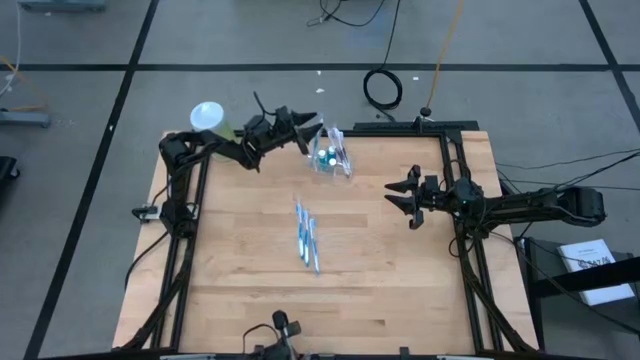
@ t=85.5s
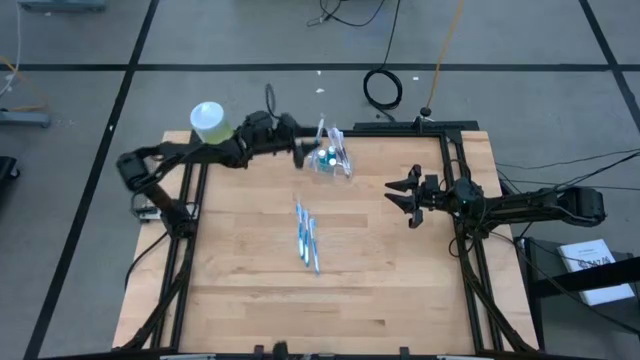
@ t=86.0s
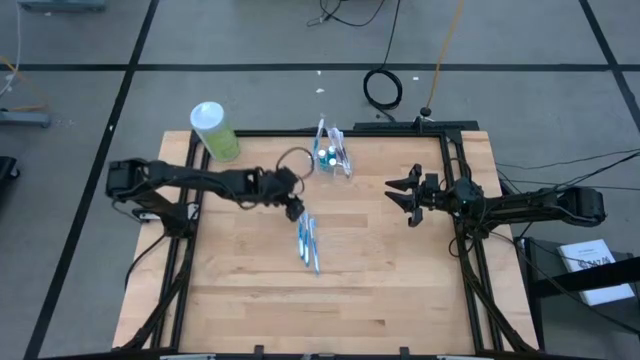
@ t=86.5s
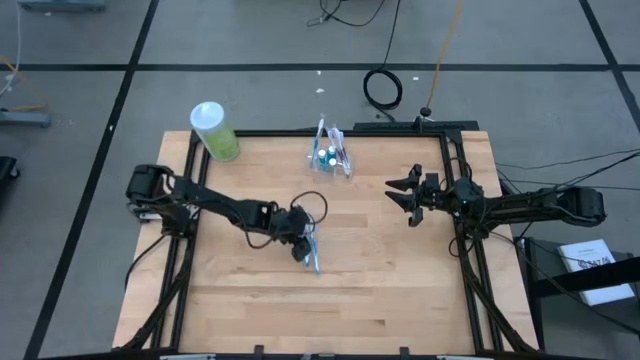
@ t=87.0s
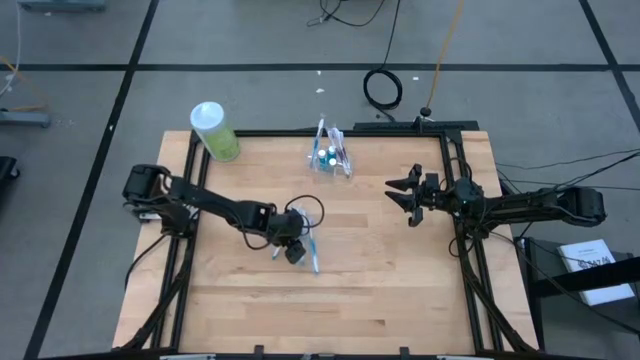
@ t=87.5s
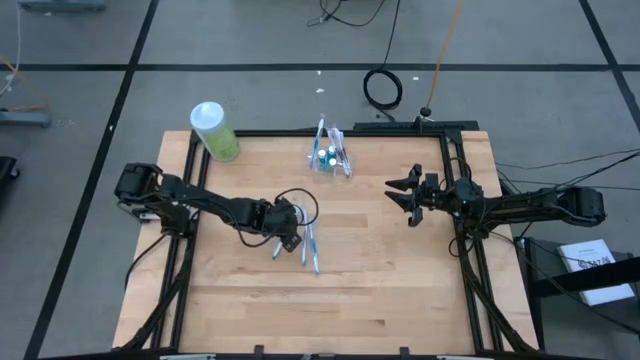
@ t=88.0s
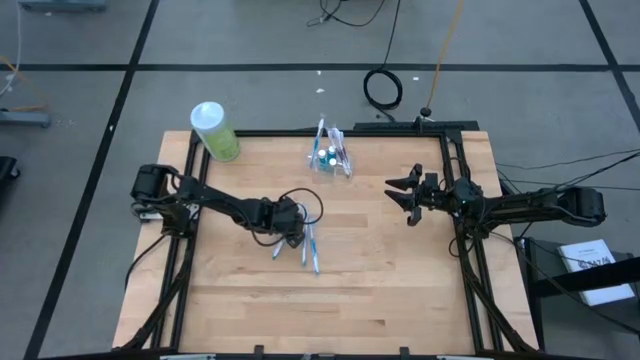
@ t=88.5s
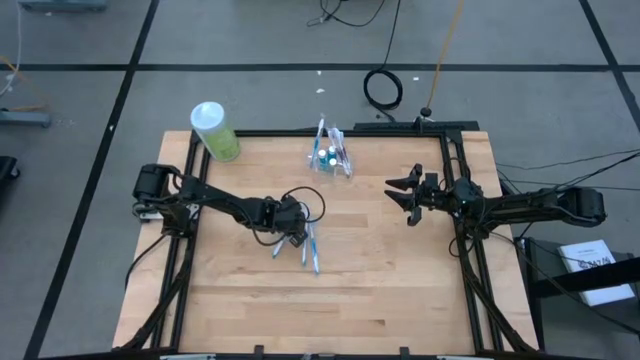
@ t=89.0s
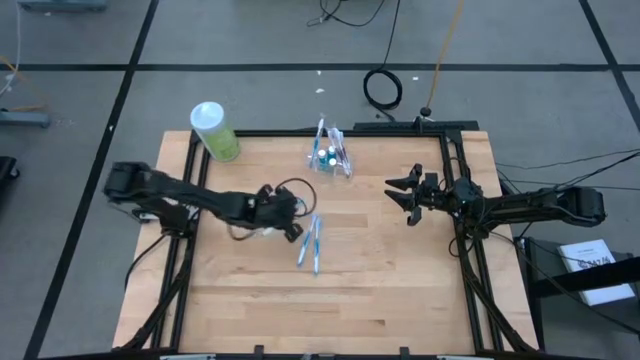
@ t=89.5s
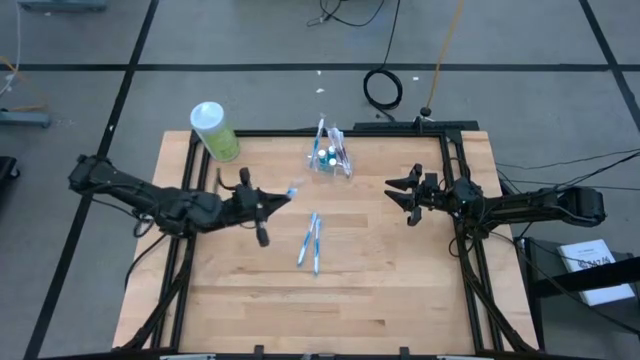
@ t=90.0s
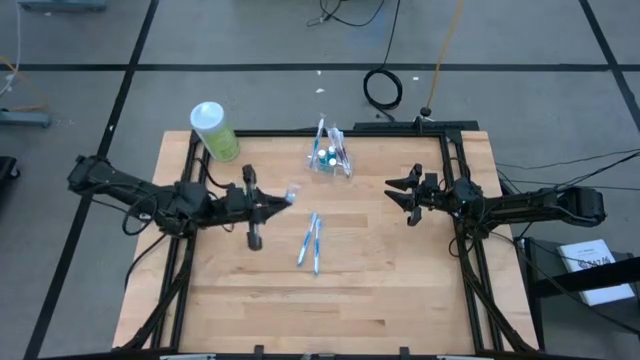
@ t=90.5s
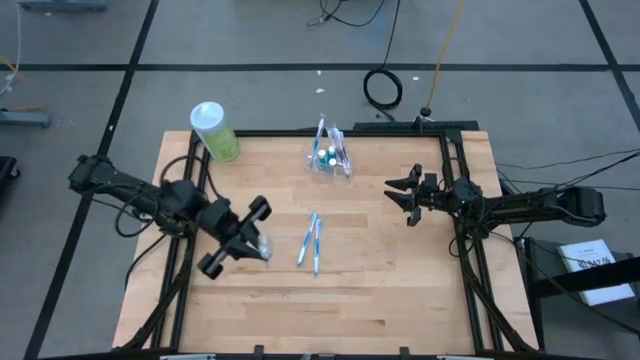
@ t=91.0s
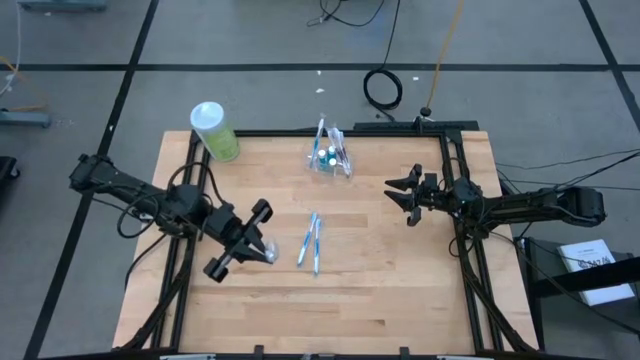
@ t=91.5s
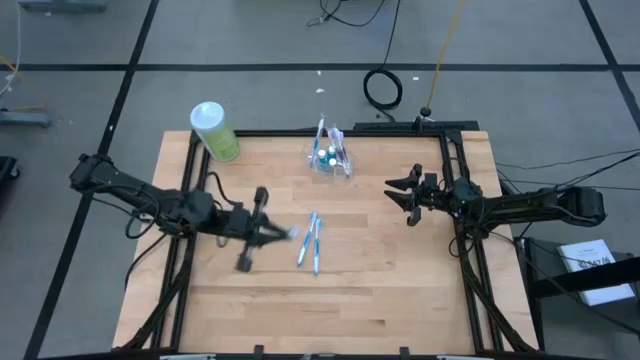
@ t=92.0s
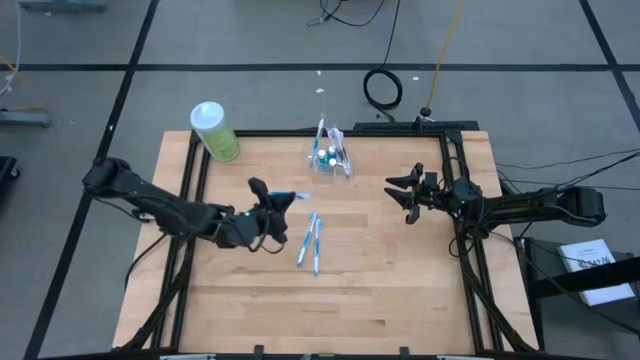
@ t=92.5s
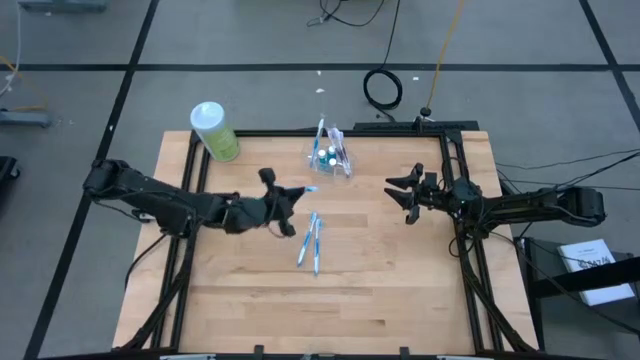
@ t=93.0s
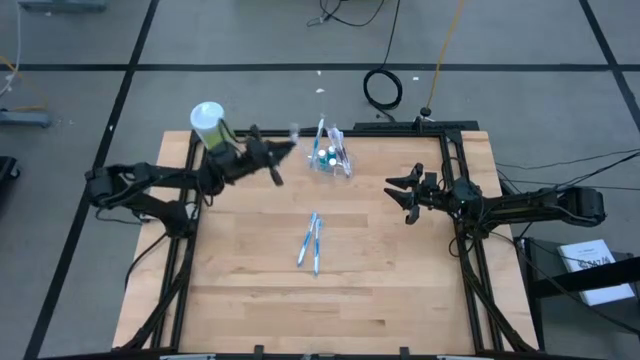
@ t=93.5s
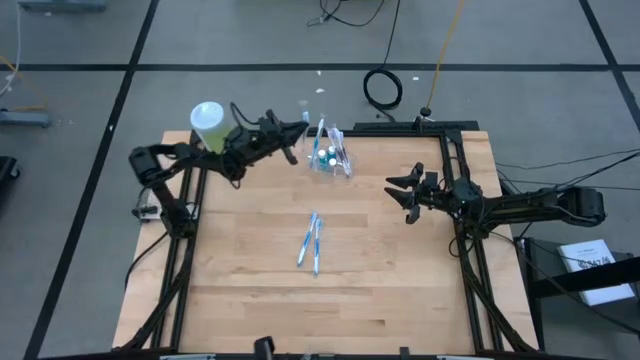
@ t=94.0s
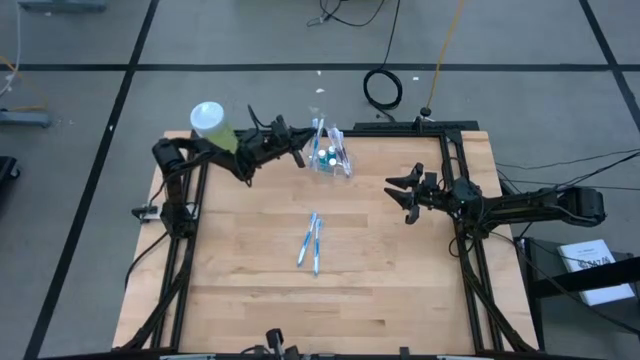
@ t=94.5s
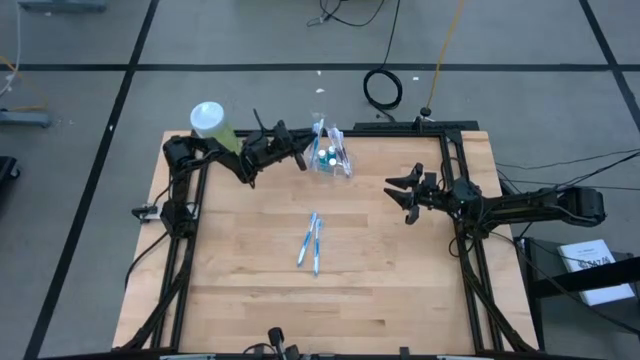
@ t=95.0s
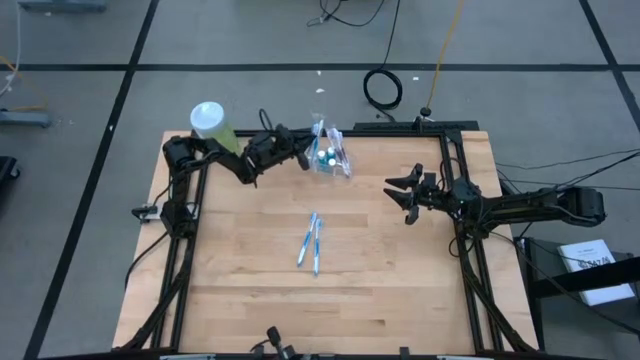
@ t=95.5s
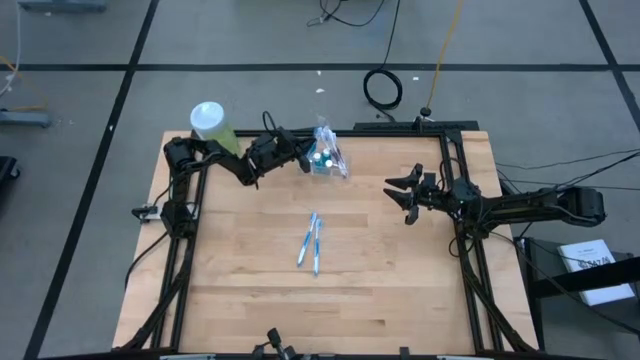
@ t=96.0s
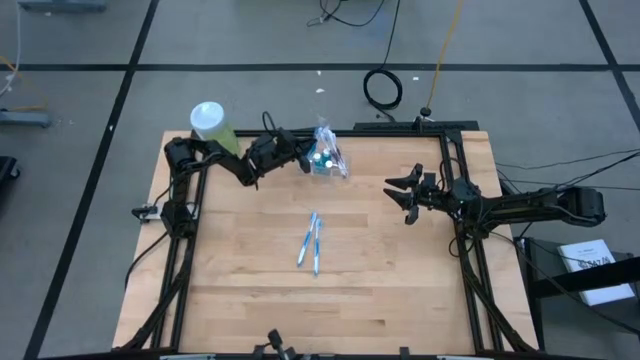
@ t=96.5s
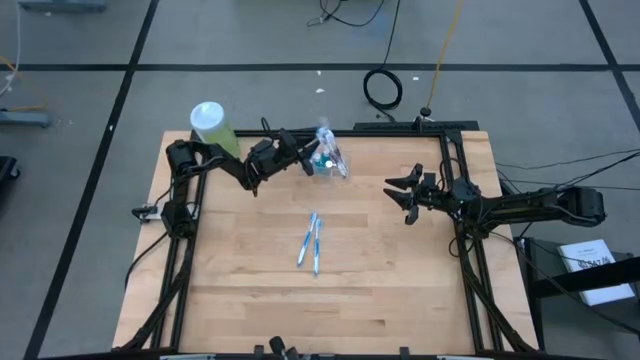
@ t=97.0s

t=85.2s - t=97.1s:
Task: Pick & Place toothbrushing station
Put the blue toothbrush into the transparent organizer

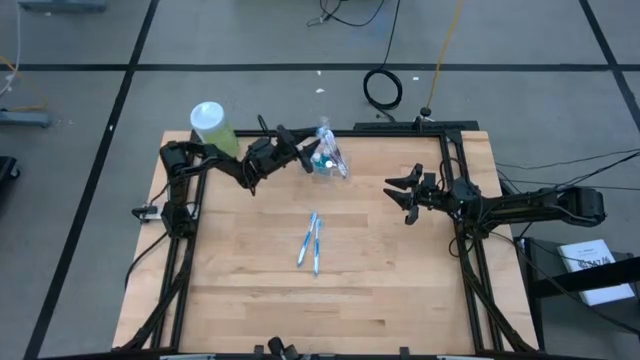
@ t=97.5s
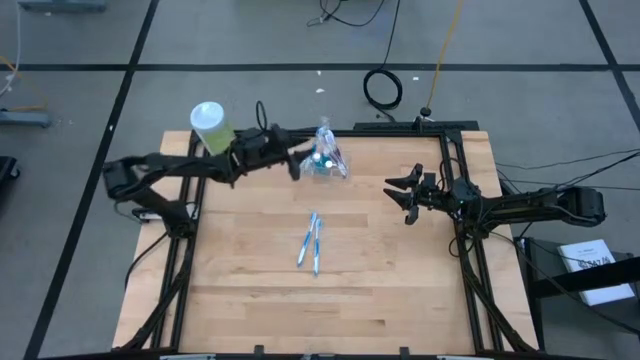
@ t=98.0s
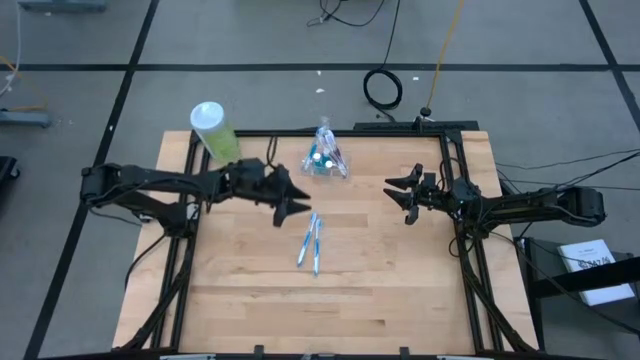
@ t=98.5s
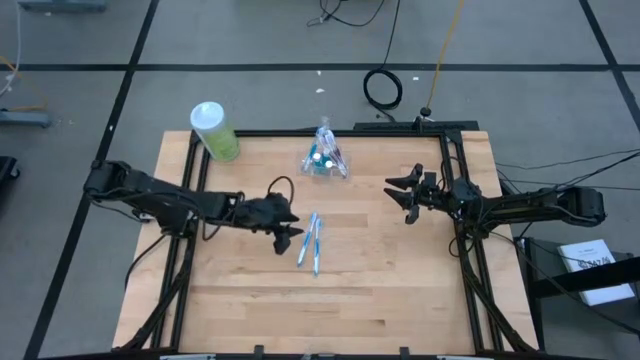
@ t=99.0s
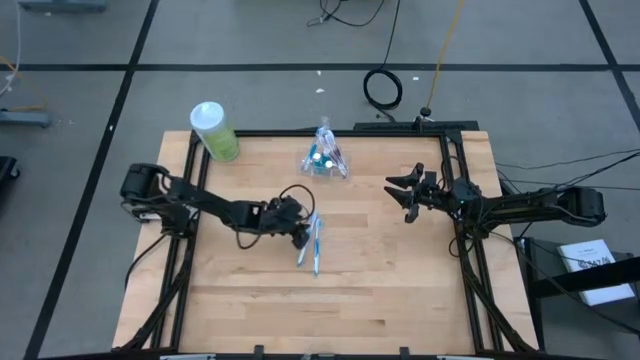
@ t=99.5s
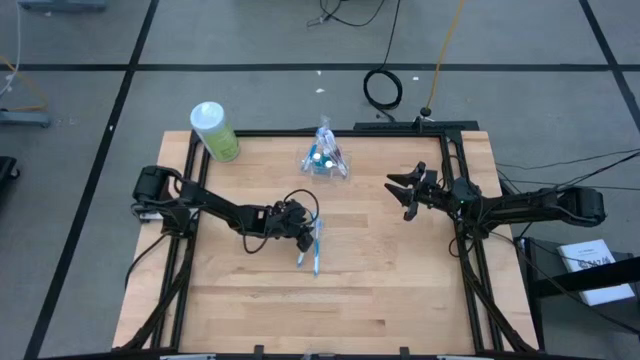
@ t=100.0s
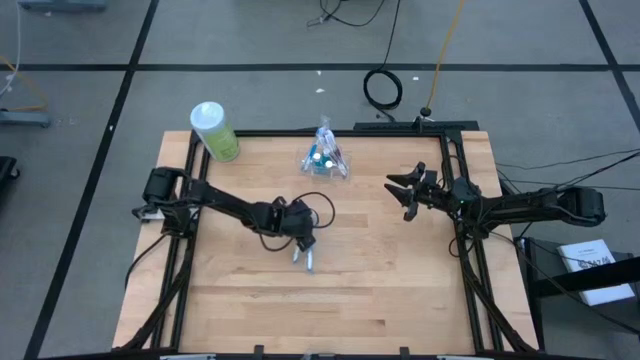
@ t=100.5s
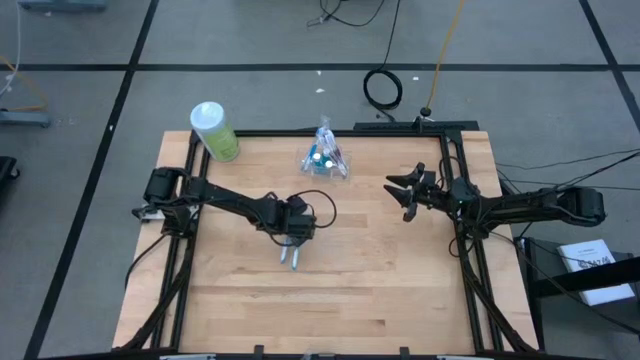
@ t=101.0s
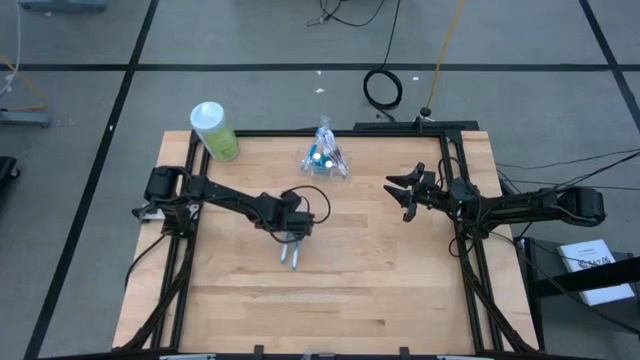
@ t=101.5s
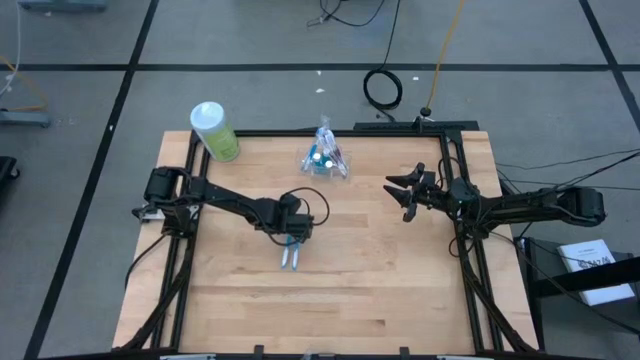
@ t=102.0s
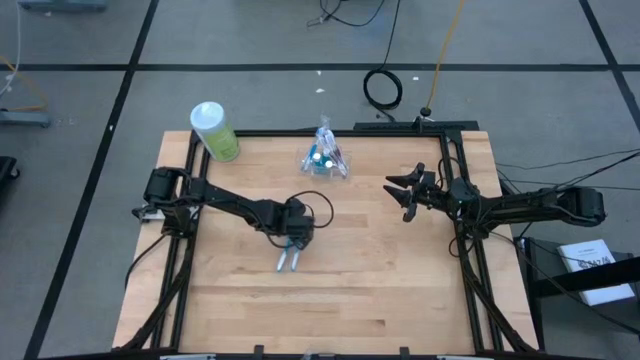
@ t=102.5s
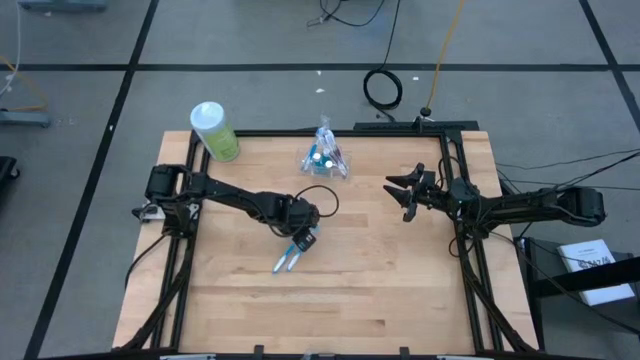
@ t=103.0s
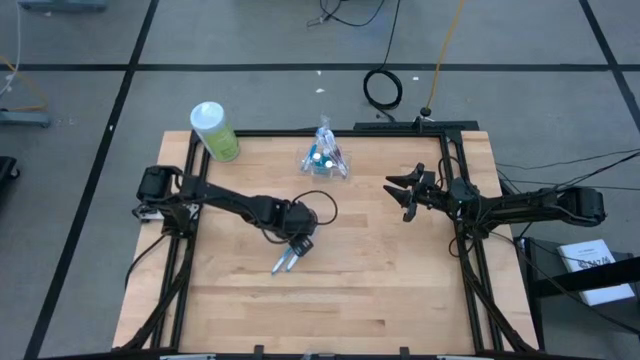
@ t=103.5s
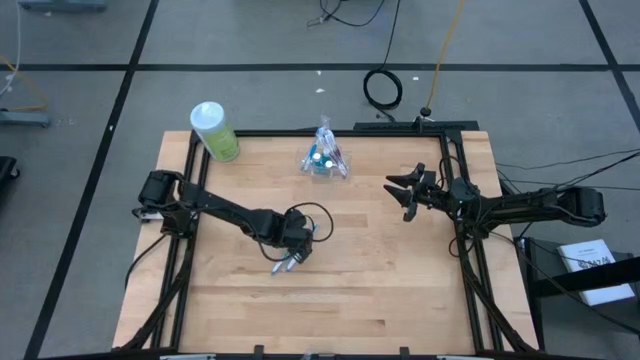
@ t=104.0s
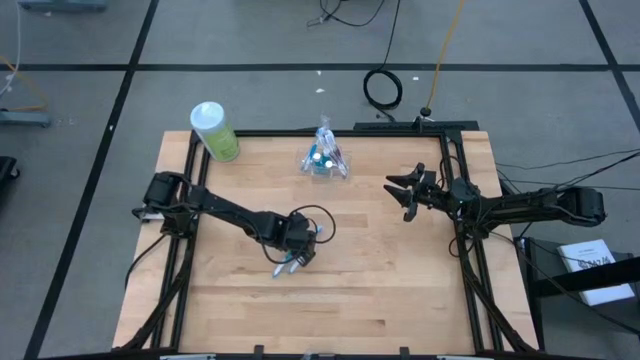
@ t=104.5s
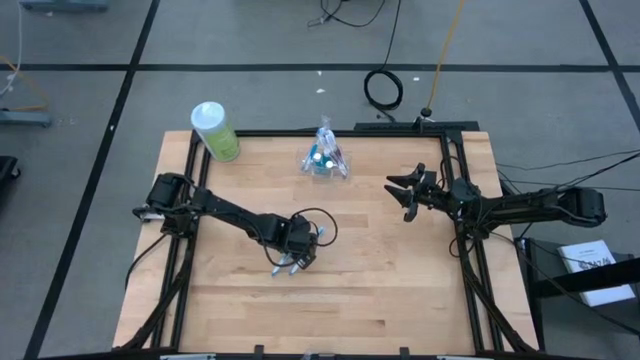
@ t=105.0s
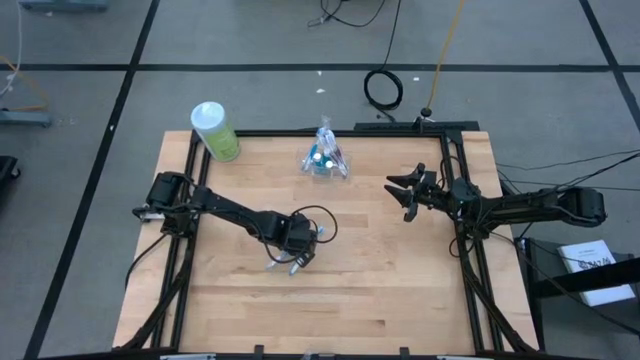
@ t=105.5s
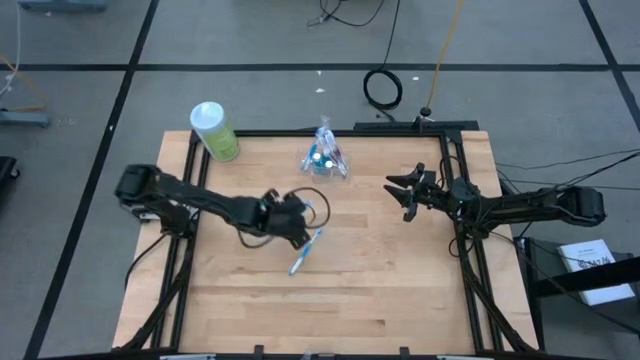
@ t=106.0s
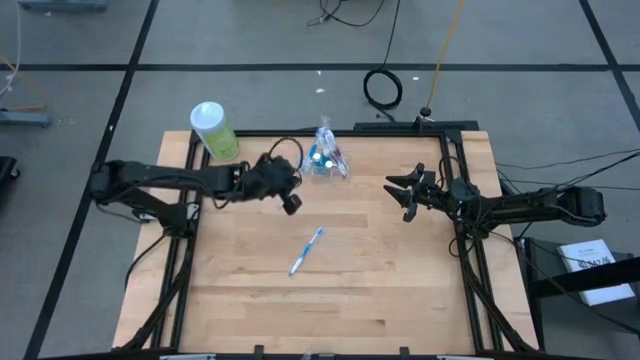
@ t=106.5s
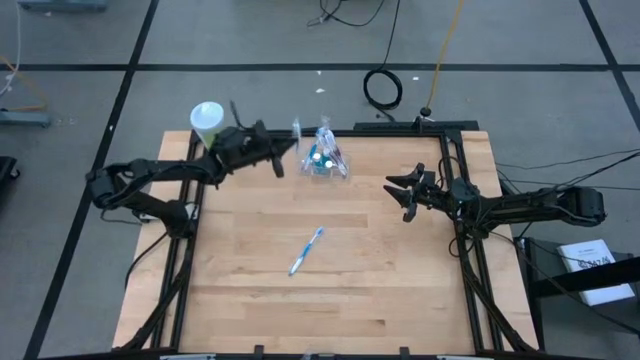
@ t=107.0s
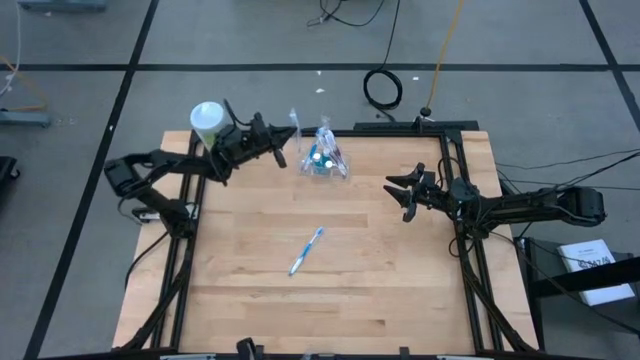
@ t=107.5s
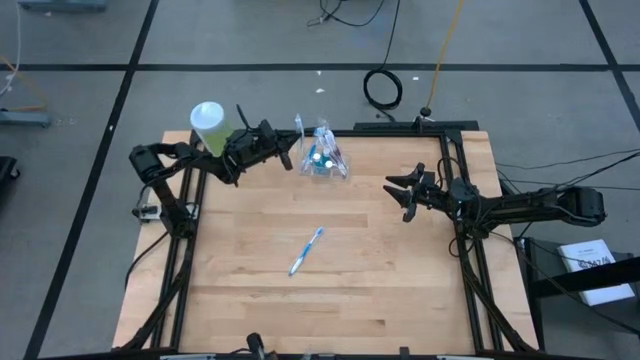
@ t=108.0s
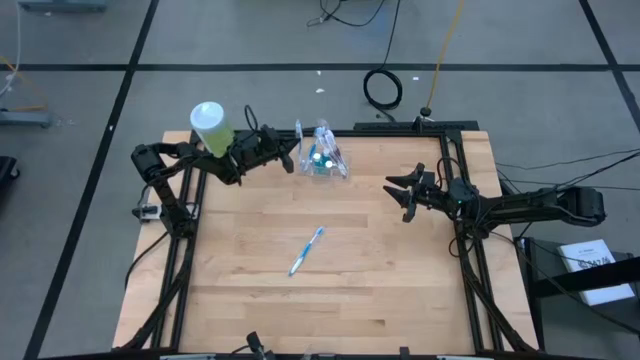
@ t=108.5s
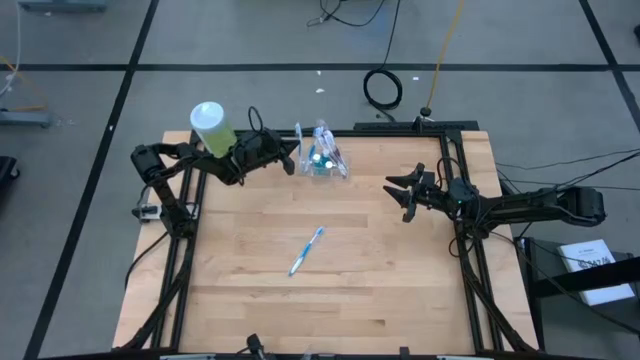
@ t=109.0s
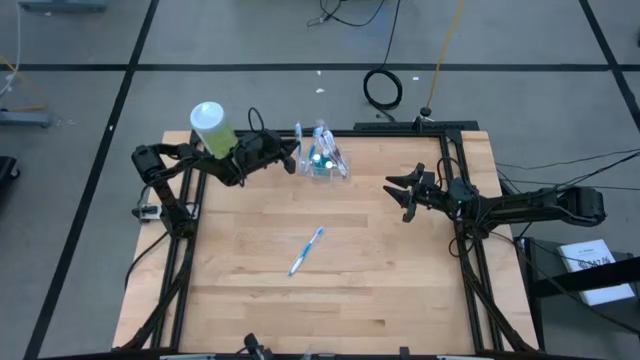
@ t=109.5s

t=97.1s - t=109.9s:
Put the blue toothbrush into the transparent organizer
